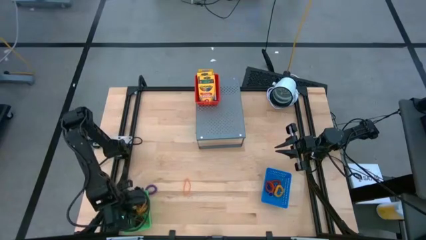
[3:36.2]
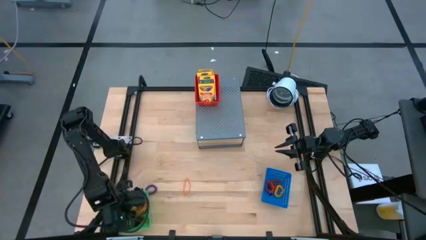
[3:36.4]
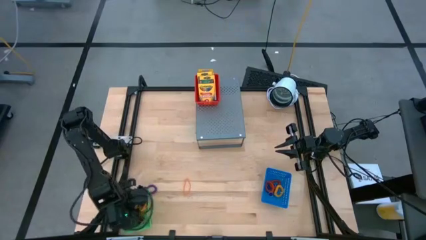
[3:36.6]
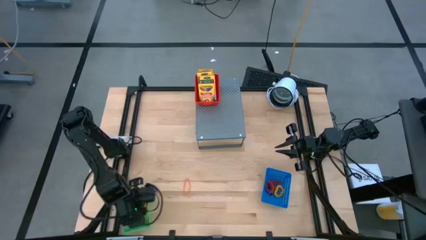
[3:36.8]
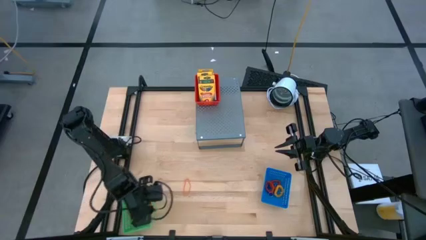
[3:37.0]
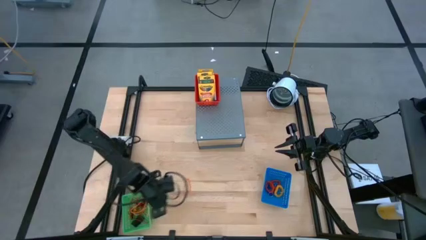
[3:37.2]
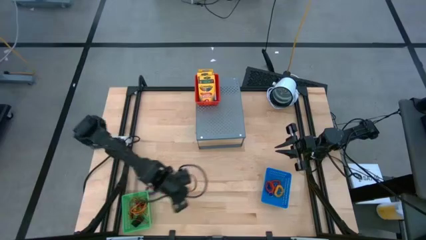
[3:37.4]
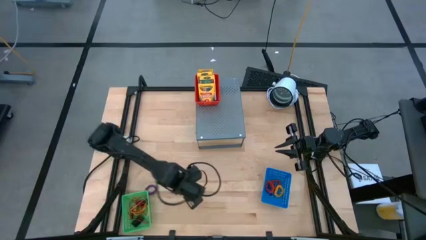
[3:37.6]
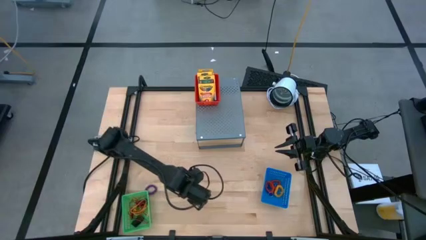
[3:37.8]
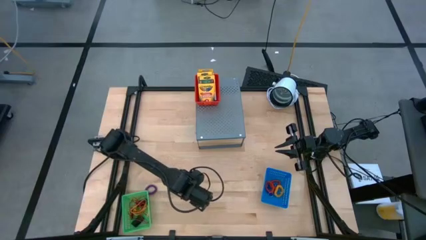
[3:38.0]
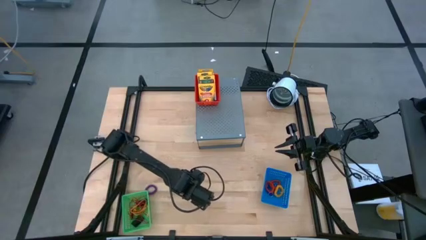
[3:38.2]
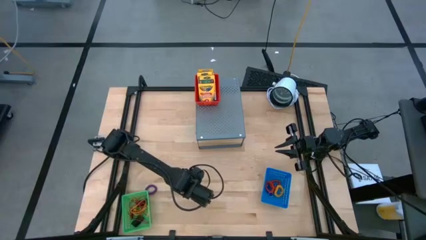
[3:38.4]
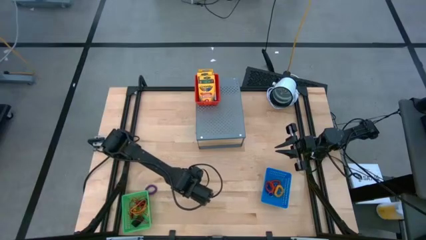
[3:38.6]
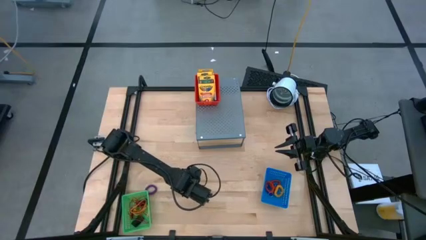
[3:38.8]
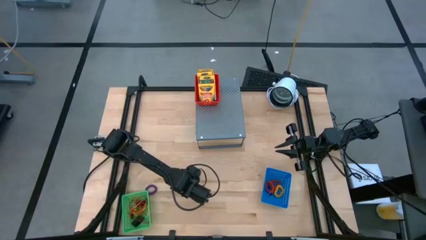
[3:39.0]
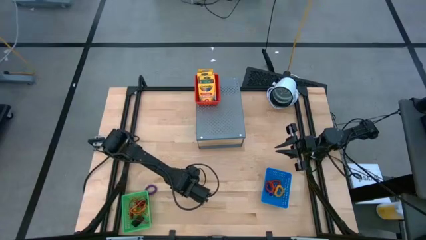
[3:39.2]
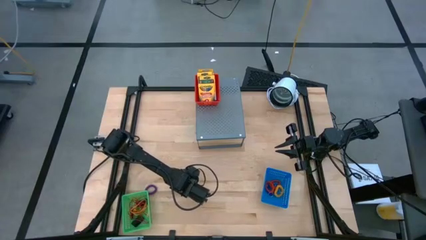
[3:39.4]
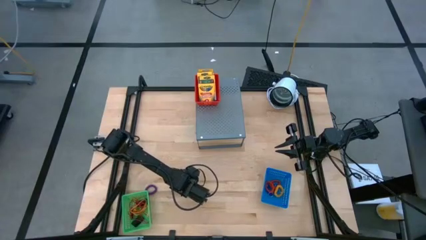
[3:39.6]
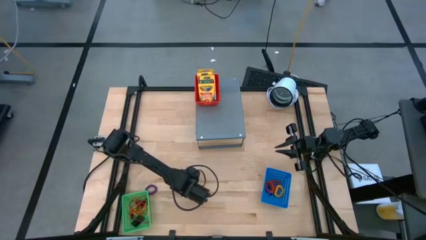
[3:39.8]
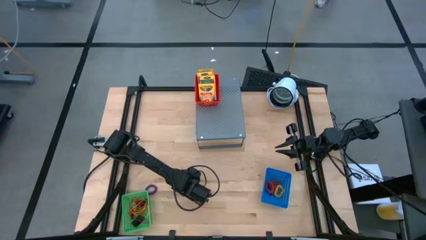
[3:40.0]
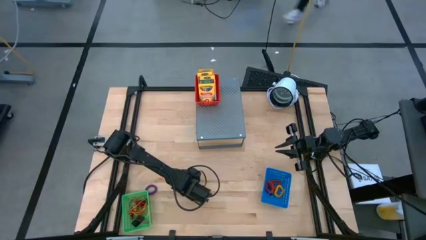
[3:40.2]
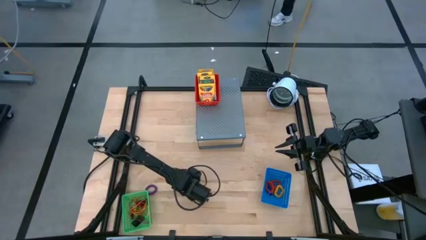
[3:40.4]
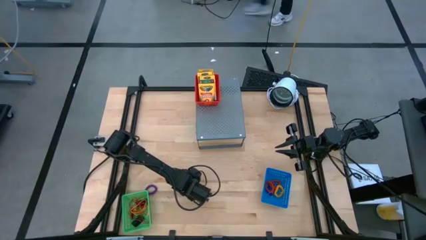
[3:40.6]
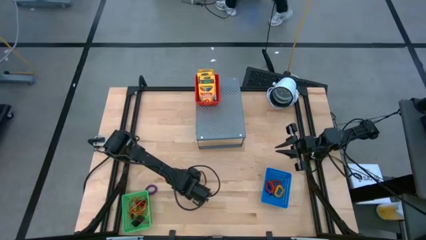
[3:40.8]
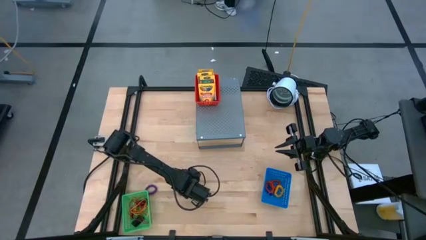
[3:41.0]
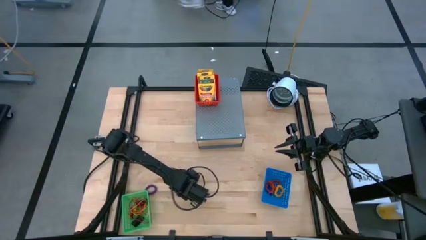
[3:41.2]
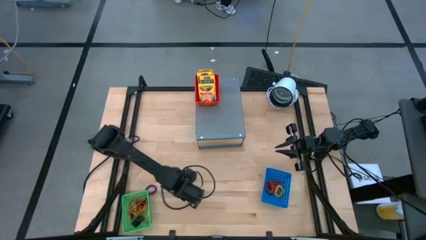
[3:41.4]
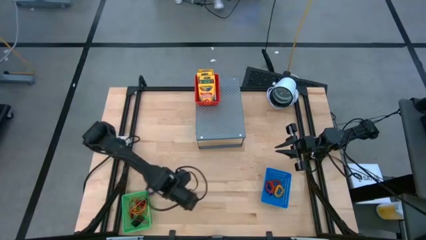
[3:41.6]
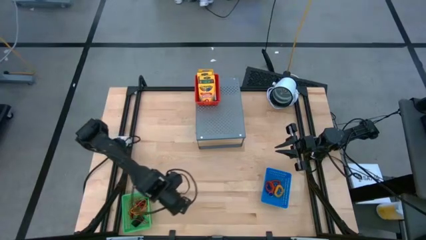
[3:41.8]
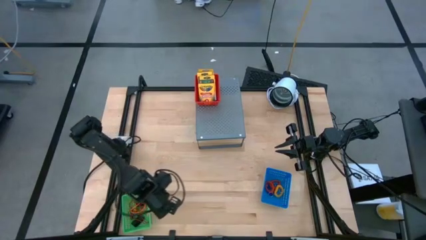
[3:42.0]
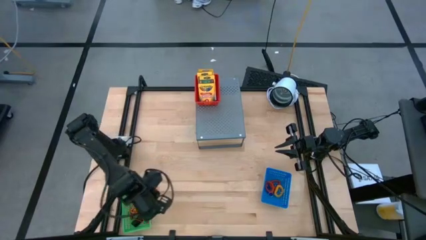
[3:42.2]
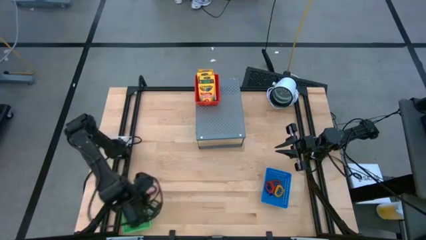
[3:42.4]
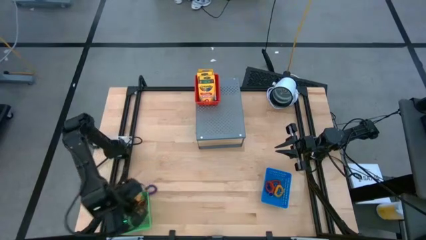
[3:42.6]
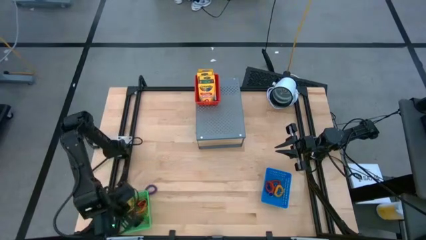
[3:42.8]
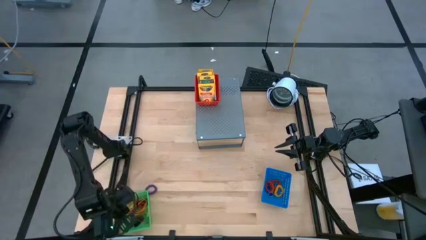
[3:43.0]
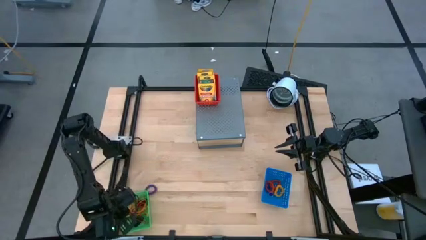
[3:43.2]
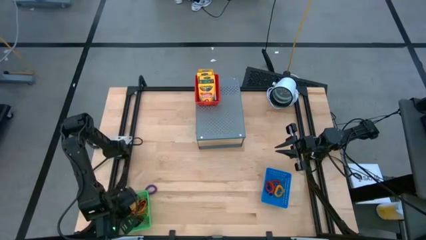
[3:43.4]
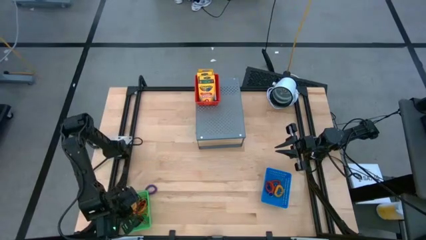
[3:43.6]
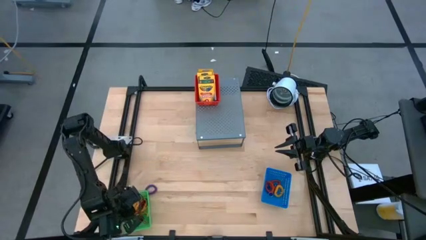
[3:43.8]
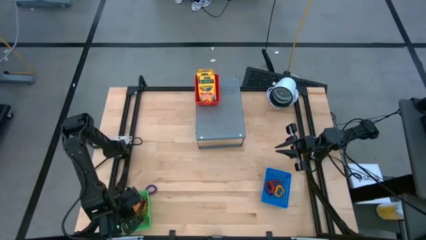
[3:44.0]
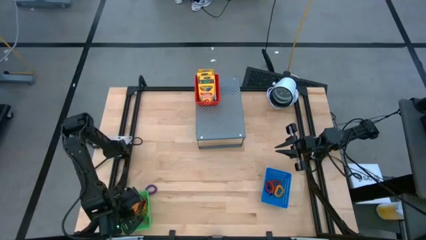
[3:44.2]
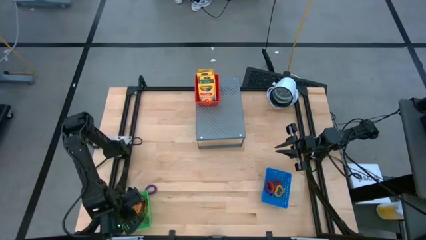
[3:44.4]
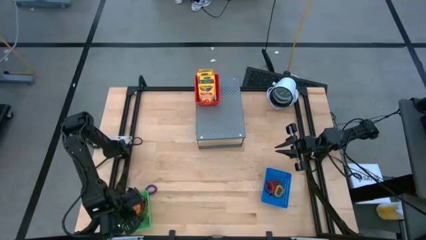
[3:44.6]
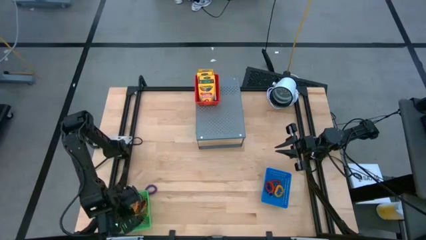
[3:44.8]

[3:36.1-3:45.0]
Task: Pick & Place Office Desk Supplies
Put the orange rubber band into the green bin

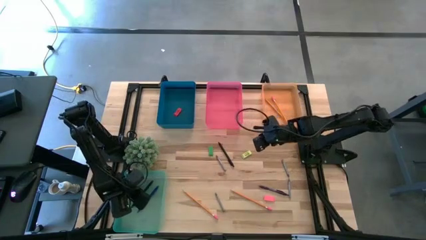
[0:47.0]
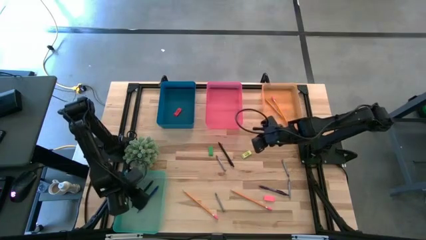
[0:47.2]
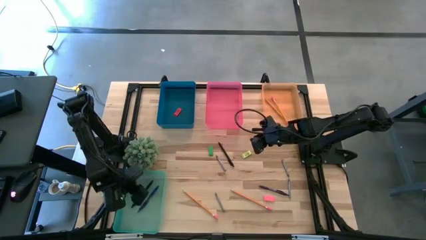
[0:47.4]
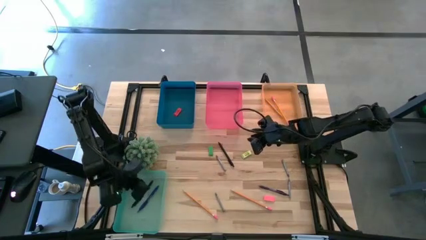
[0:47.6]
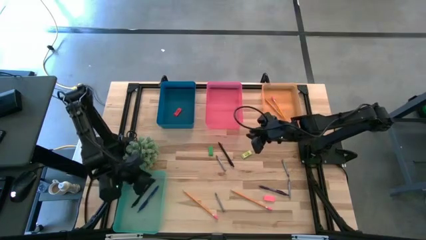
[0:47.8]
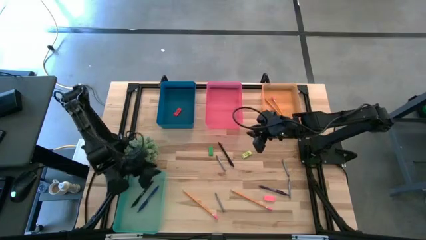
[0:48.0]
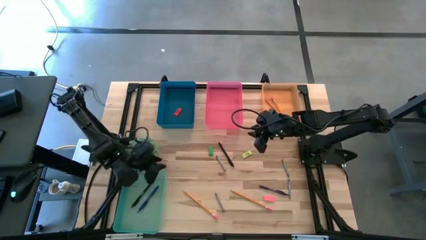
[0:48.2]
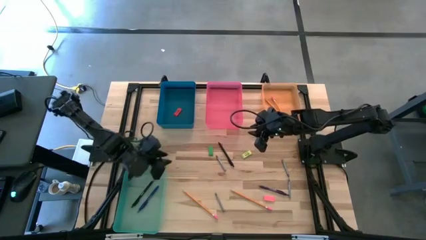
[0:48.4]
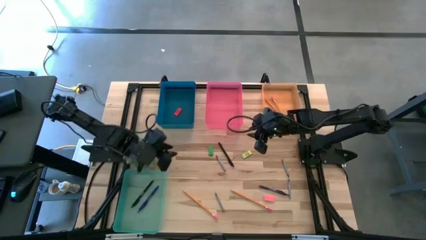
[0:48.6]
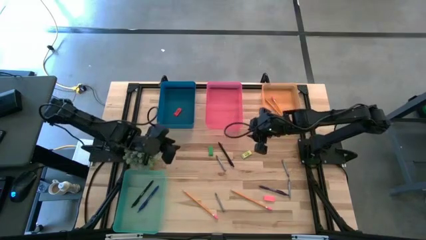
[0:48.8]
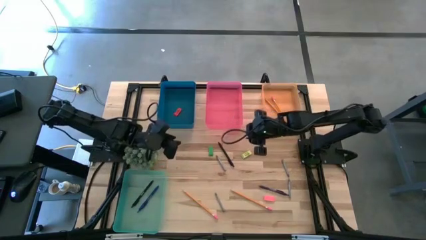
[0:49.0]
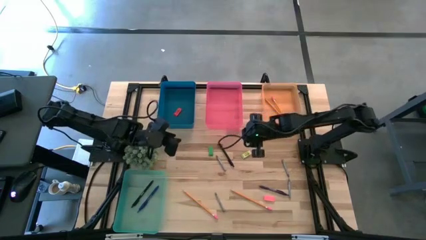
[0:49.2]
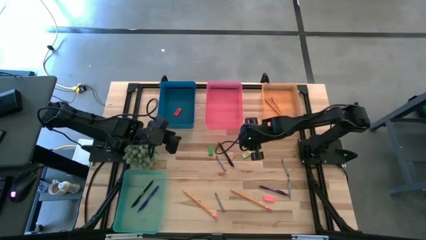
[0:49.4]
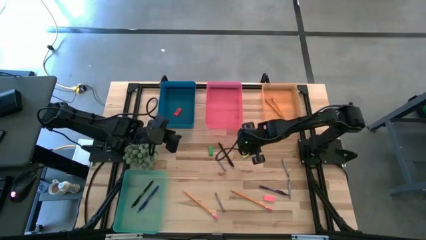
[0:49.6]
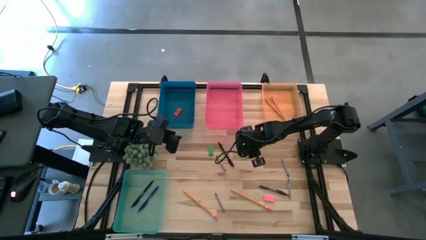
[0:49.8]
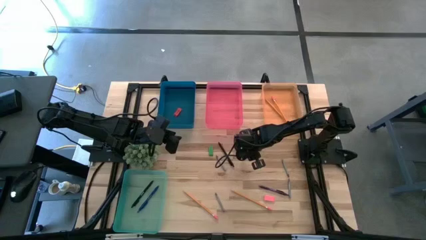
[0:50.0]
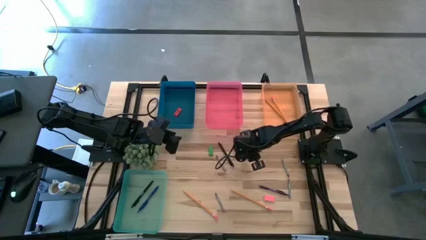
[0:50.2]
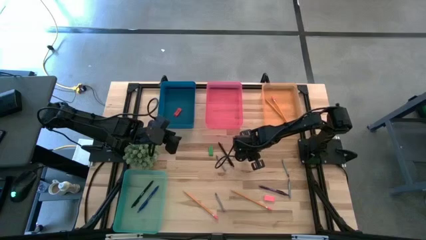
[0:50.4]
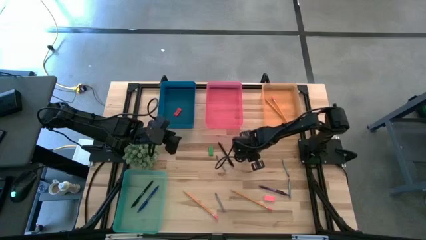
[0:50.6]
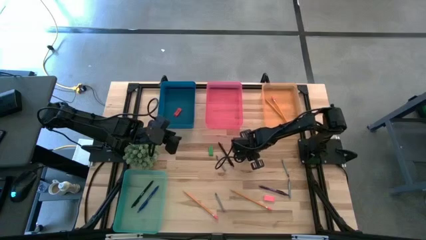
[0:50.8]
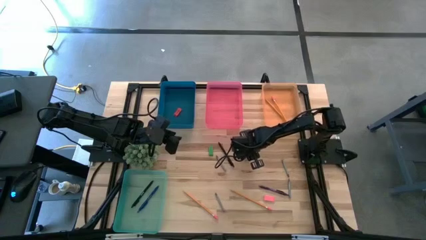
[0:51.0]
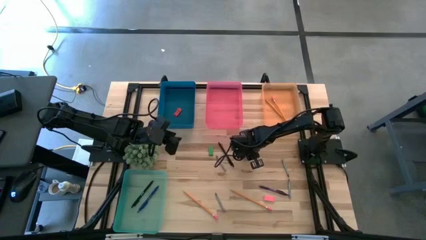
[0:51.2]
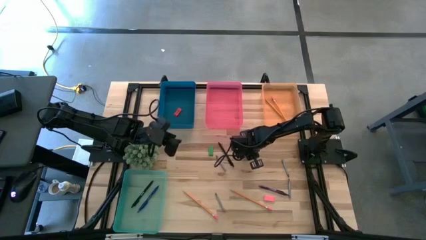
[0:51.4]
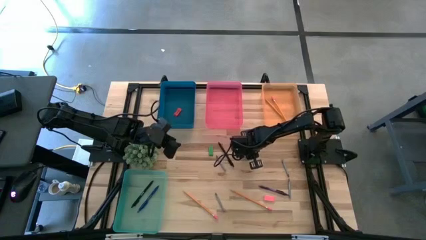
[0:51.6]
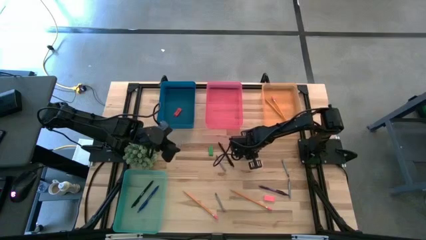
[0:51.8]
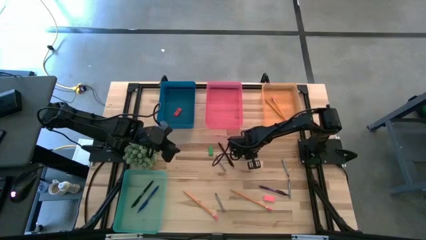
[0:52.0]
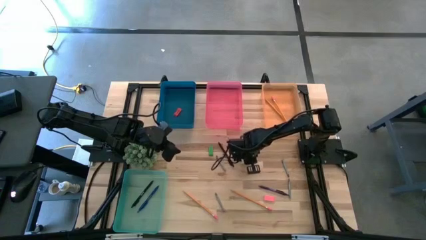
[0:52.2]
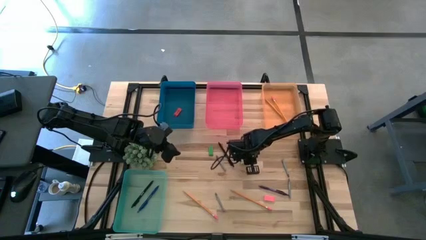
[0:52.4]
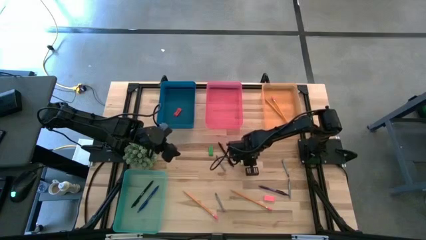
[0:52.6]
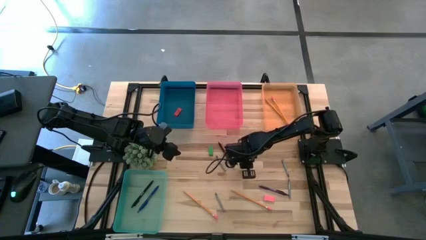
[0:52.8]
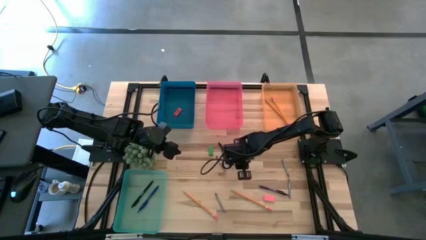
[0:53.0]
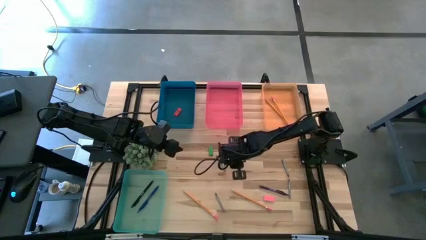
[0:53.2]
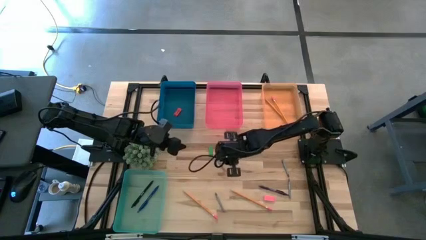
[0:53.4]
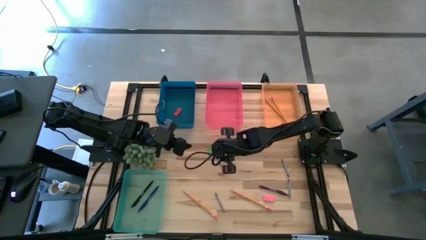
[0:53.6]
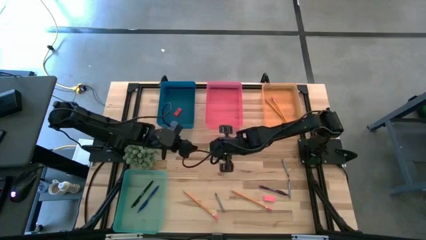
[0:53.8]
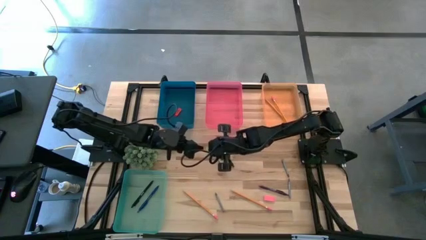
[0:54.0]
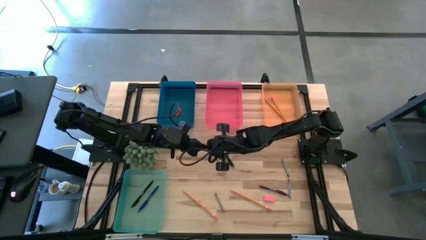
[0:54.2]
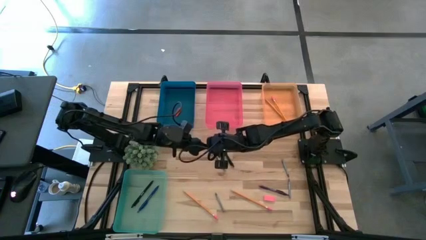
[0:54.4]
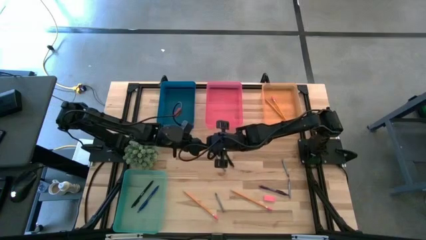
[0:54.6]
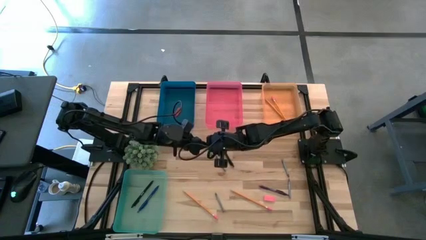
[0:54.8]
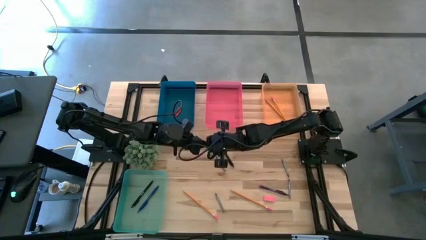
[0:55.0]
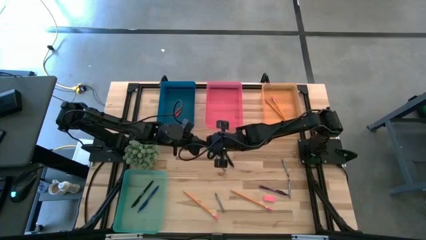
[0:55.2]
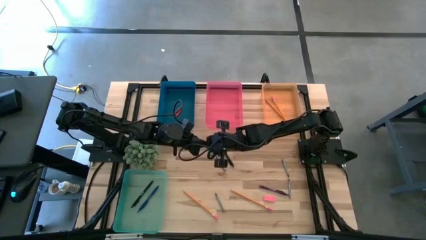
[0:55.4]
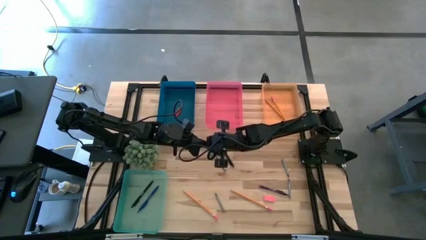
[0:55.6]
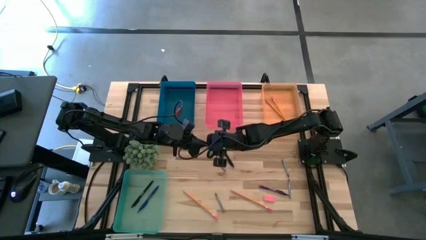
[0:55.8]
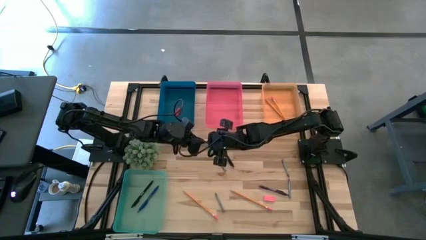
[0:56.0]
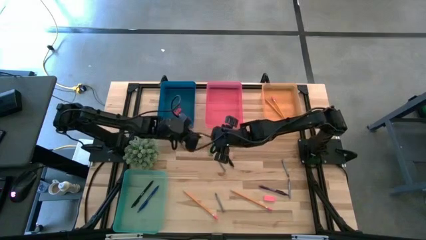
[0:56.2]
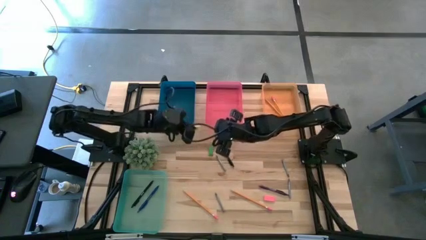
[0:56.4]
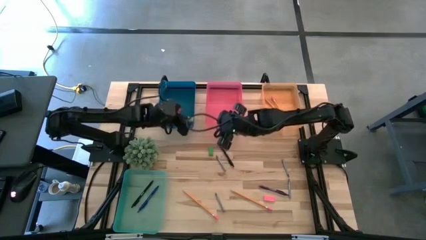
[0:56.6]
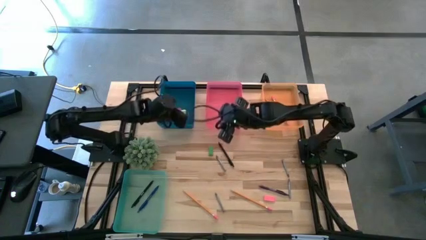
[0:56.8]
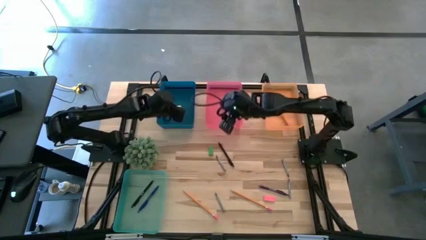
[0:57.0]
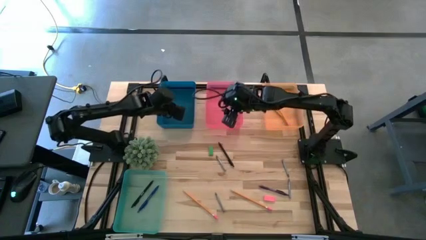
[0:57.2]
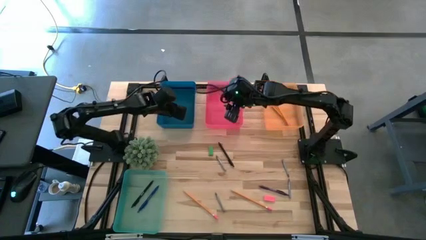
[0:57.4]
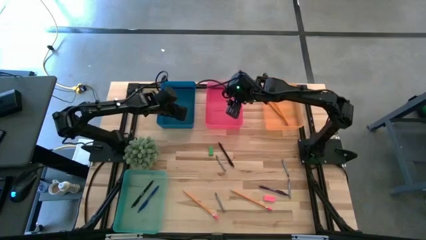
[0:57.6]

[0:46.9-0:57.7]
Task: Sort crayons/erasers/pens/pencils in bins
Put the light green eraser into the transparent blue bin
